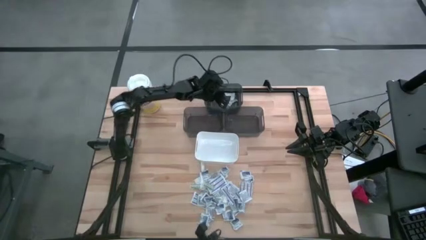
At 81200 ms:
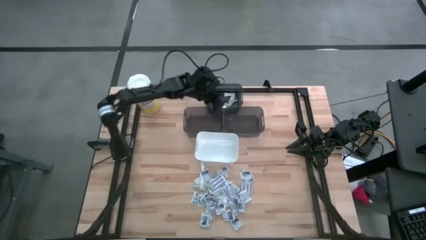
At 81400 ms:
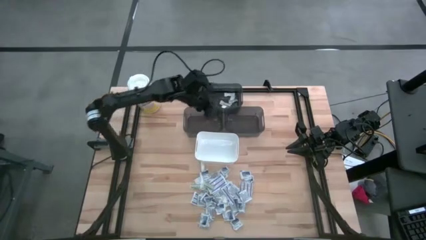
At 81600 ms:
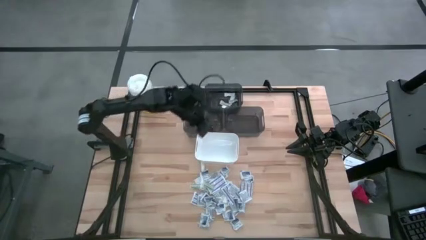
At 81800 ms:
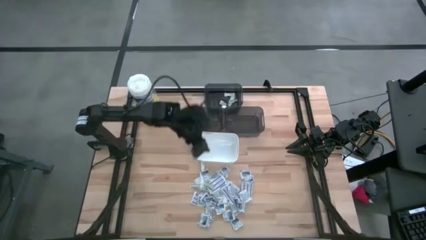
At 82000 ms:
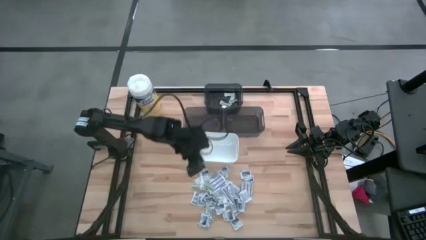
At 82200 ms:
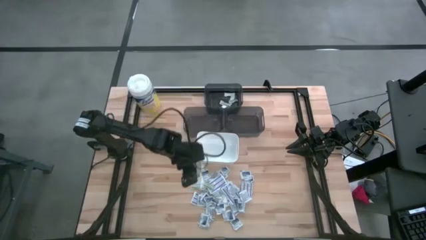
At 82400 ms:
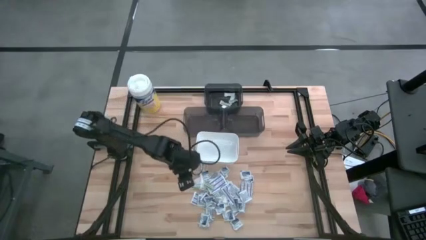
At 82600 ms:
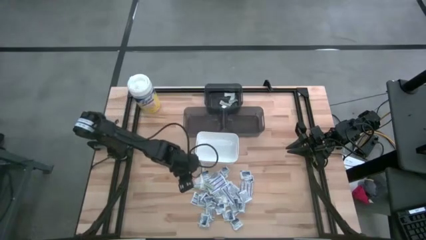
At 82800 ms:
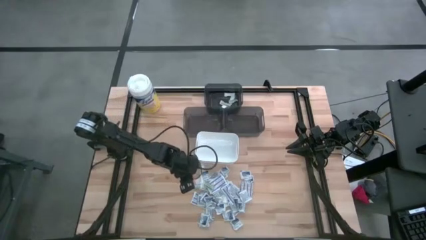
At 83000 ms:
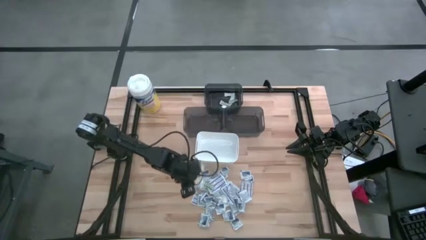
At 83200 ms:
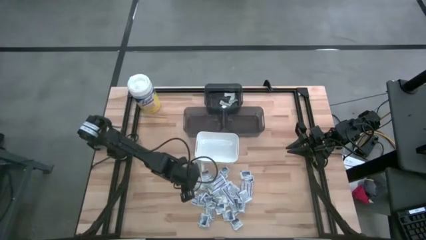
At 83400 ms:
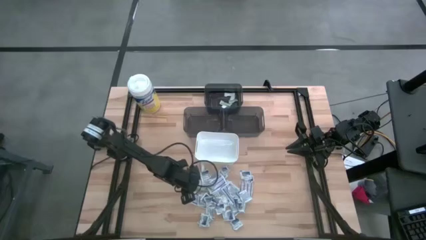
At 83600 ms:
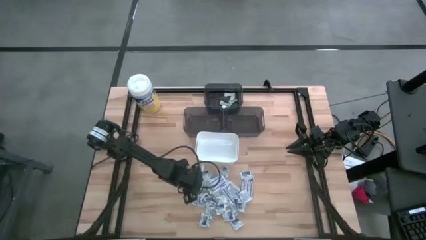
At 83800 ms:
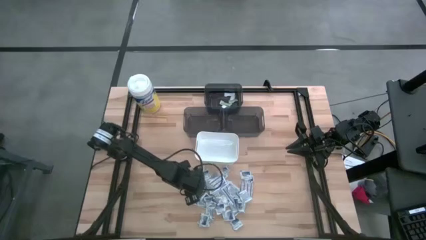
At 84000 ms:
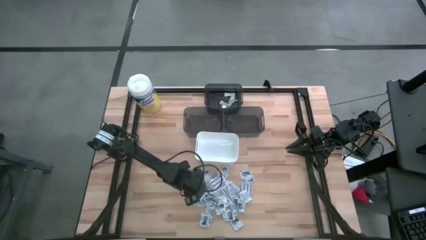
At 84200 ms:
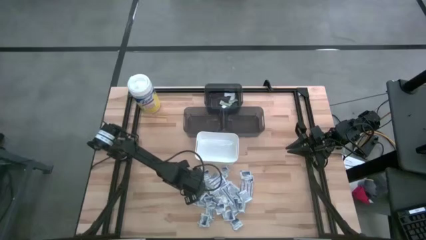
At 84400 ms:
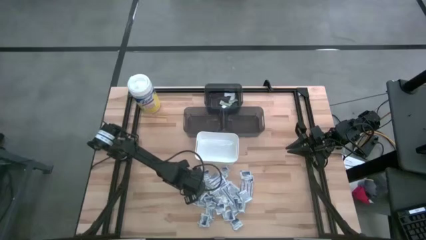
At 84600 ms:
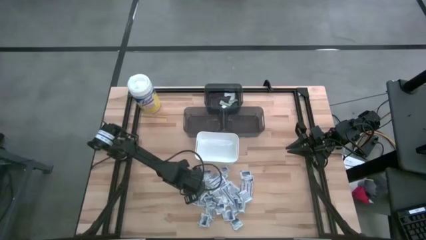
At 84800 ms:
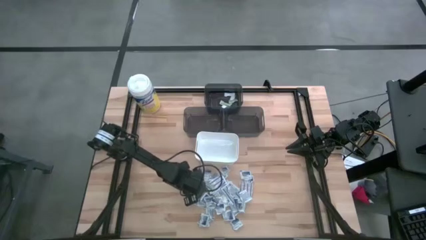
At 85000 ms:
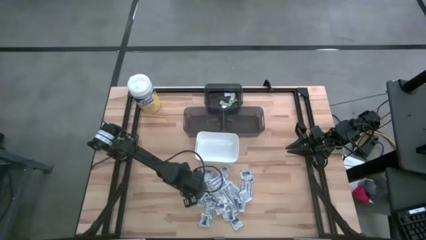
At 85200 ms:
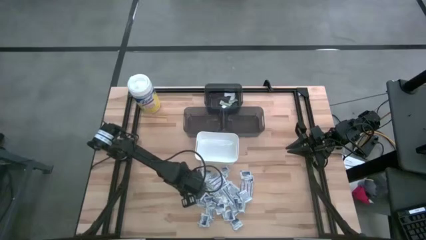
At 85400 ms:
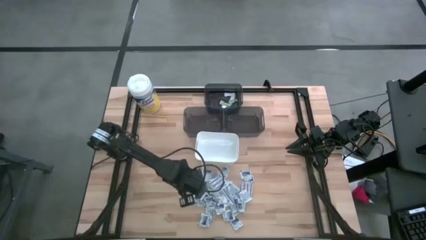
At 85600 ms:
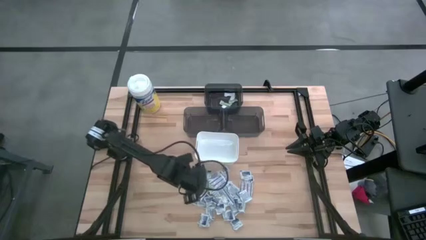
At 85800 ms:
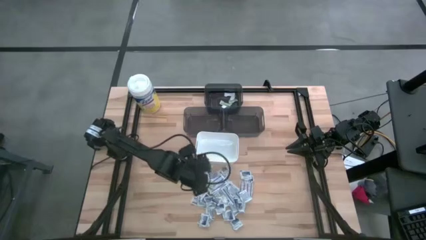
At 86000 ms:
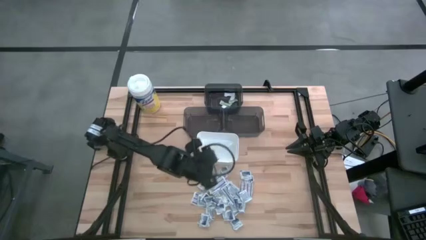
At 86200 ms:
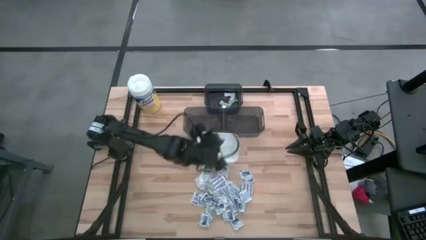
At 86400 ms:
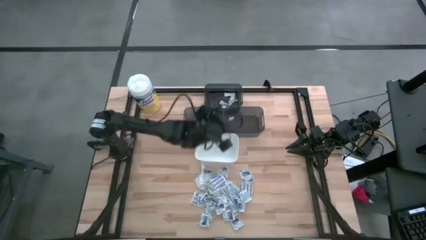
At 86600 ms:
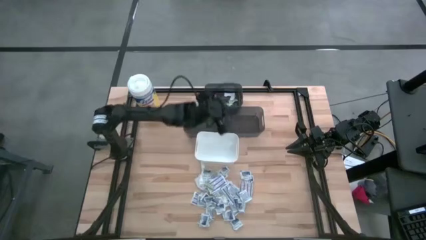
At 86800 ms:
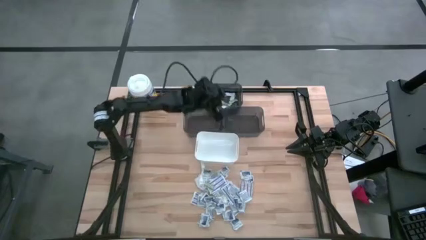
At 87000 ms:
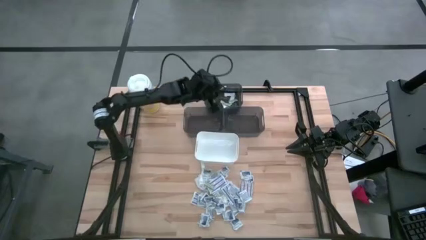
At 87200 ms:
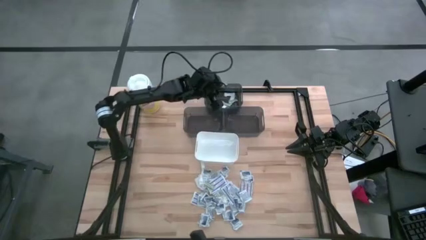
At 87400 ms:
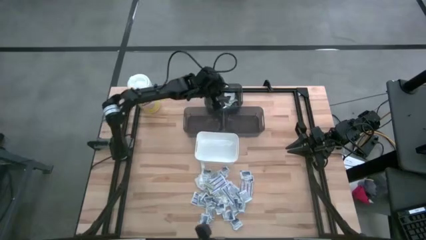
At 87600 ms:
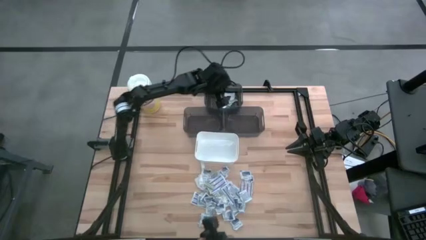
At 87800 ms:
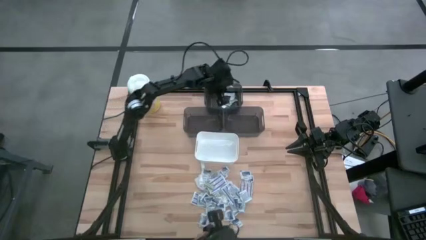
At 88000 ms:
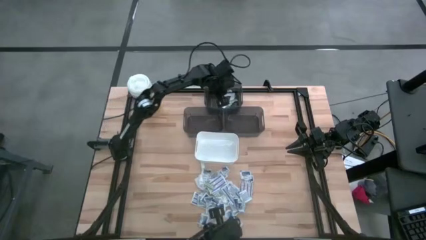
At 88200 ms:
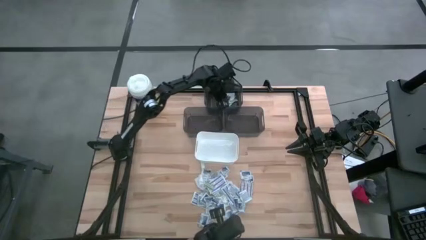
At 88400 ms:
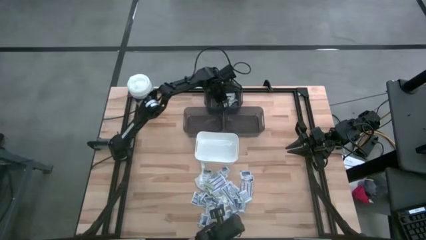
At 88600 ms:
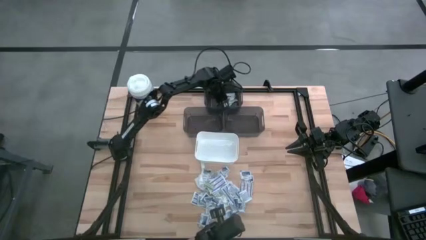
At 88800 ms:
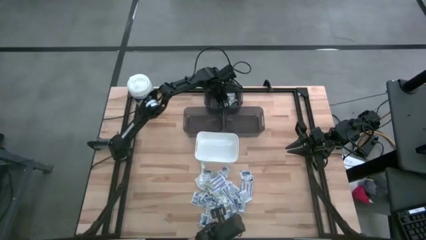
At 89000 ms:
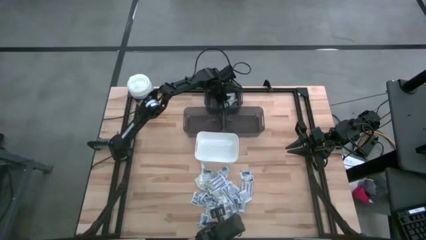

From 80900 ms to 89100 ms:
Task: Pick & Place First Aid Supplies
Put the green bandage into the top black bin

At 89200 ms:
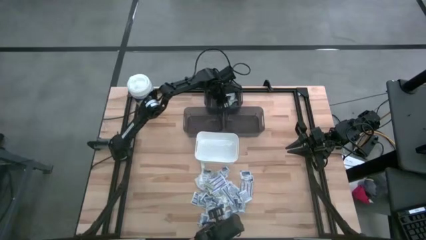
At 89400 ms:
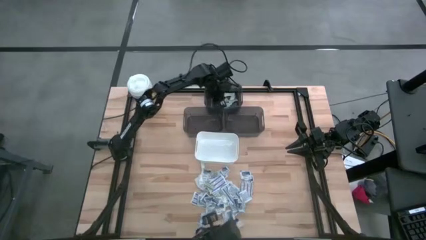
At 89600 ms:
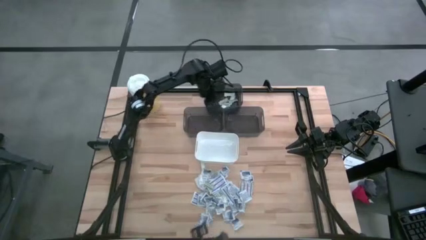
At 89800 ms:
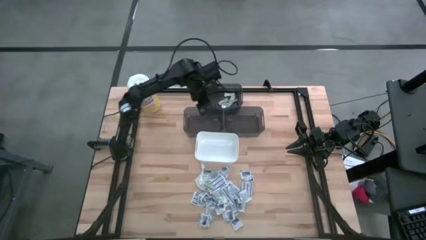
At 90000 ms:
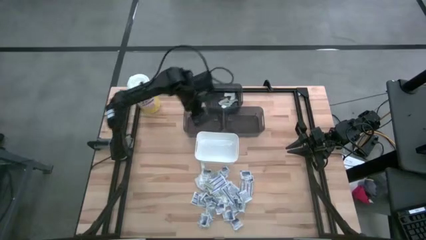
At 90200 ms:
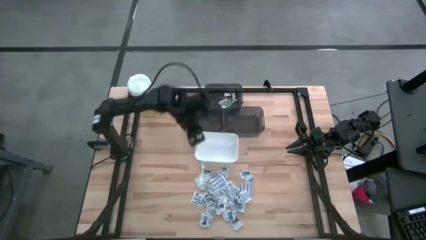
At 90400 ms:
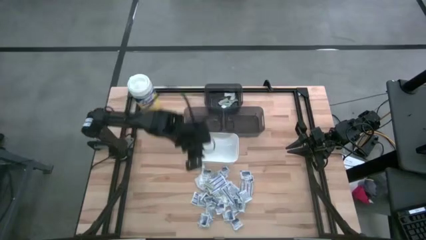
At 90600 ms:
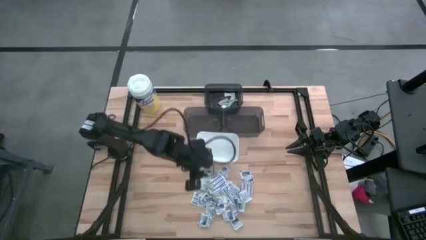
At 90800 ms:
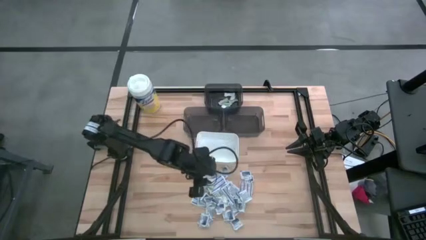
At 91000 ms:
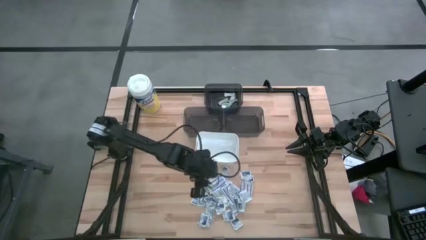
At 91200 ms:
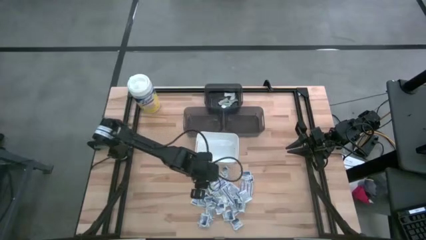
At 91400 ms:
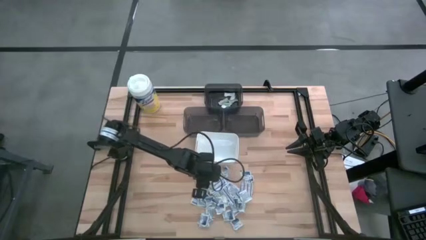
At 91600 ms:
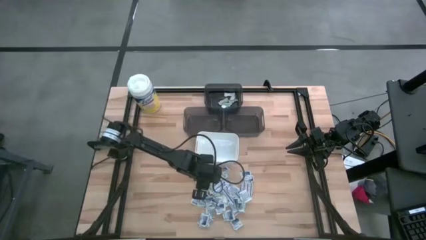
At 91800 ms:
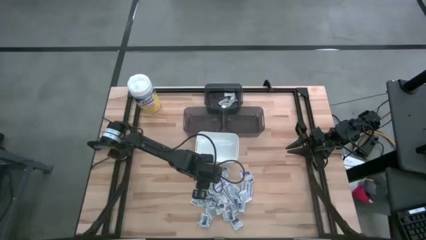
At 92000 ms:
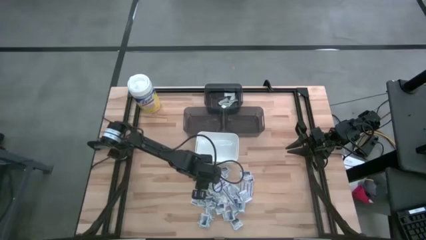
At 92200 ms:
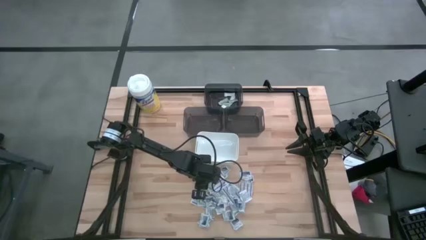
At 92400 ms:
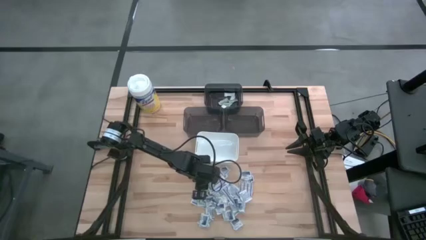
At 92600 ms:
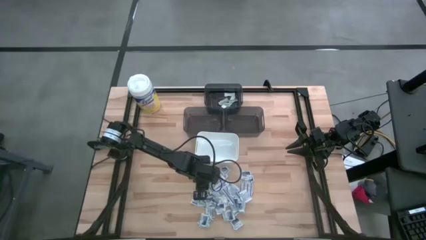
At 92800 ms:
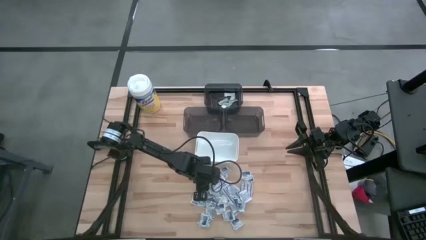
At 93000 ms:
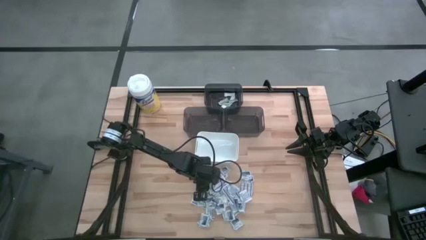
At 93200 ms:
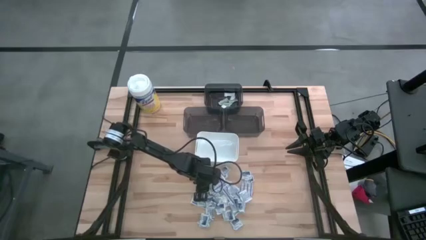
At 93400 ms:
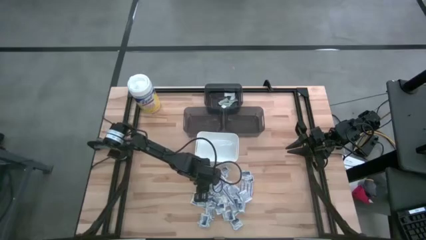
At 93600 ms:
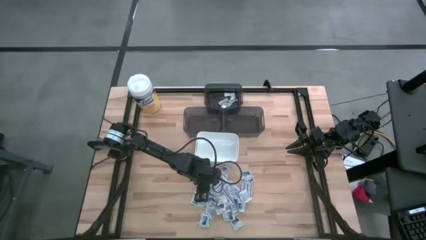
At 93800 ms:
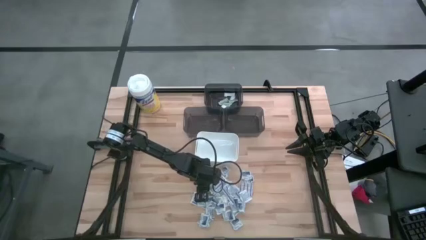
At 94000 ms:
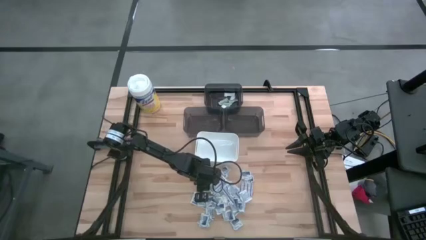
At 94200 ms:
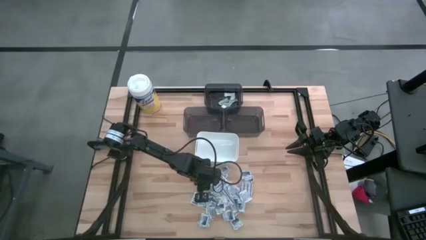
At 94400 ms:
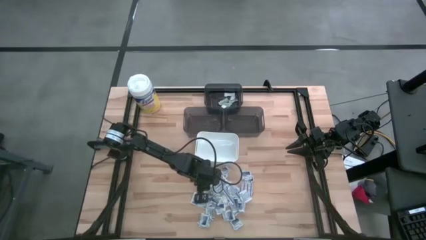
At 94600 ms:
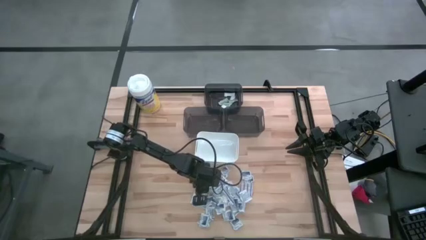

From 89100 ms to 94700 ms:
Put the green bandage into the top black bin

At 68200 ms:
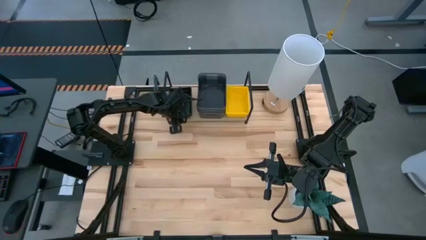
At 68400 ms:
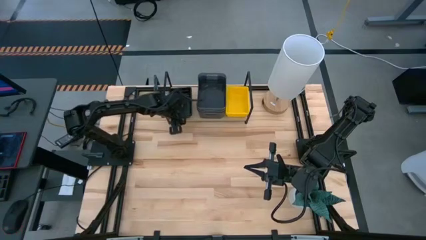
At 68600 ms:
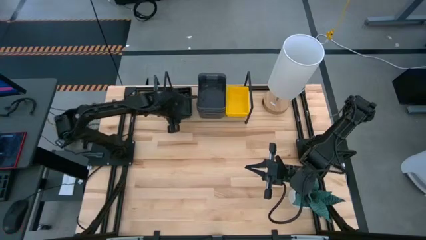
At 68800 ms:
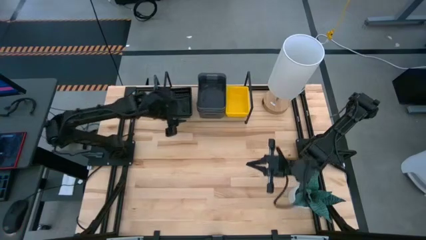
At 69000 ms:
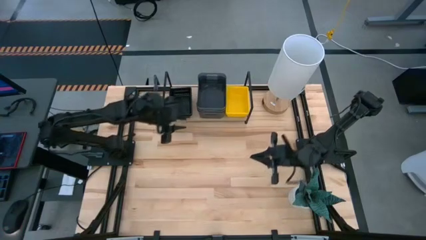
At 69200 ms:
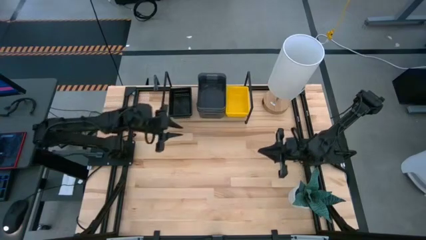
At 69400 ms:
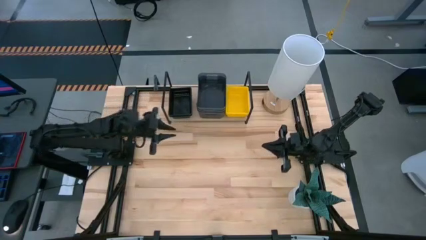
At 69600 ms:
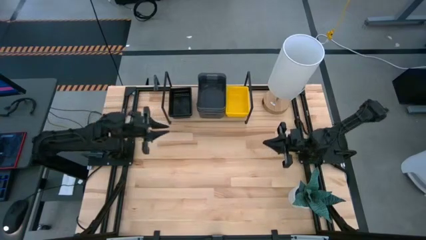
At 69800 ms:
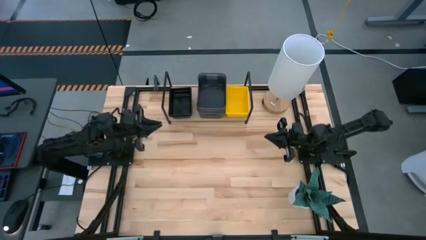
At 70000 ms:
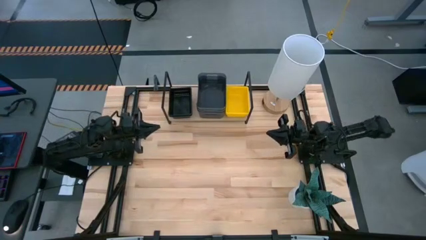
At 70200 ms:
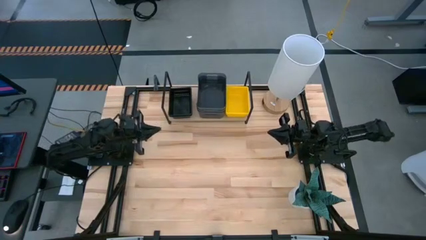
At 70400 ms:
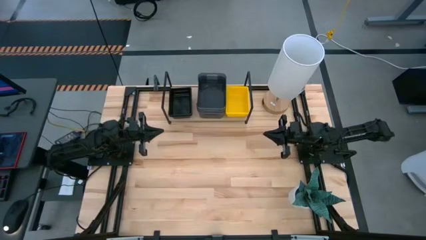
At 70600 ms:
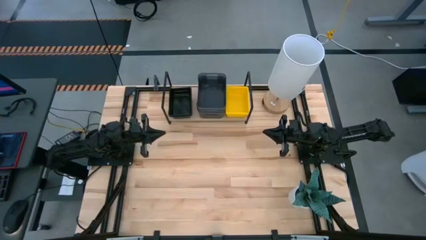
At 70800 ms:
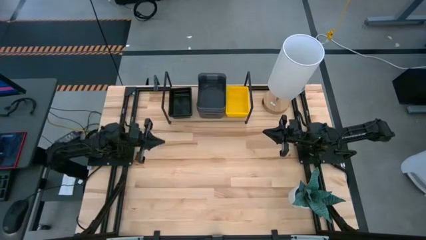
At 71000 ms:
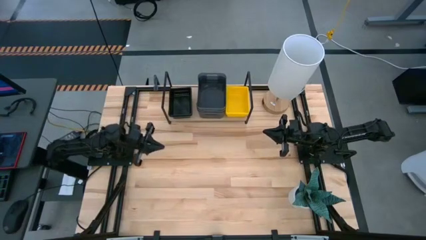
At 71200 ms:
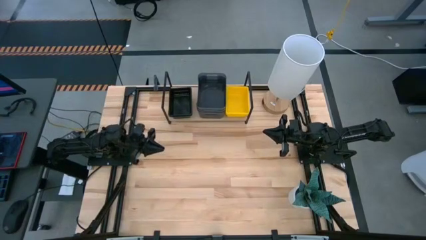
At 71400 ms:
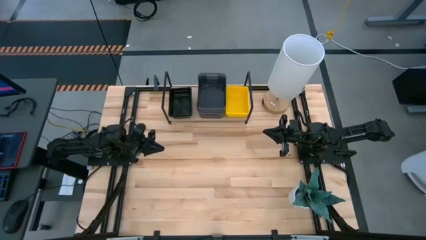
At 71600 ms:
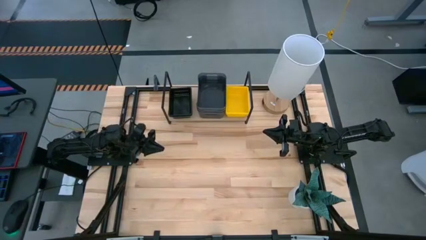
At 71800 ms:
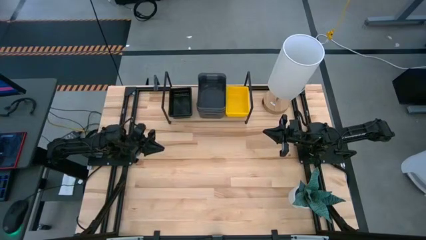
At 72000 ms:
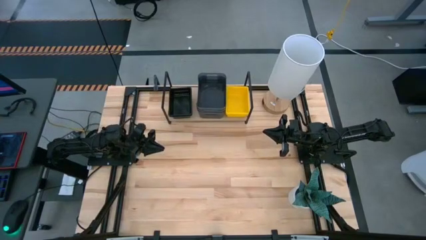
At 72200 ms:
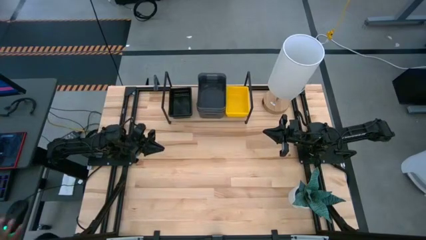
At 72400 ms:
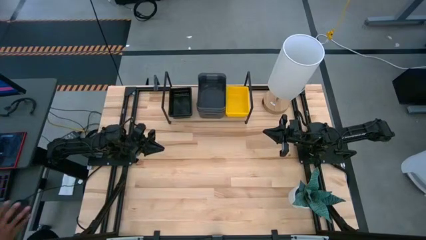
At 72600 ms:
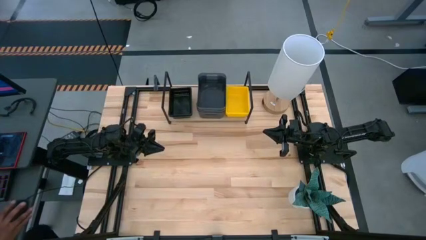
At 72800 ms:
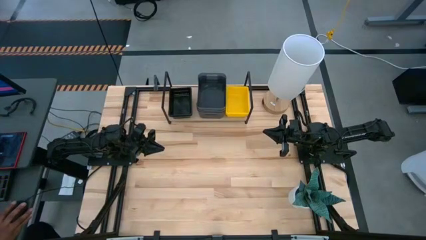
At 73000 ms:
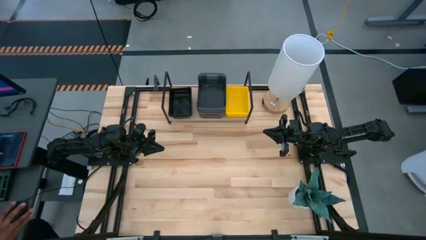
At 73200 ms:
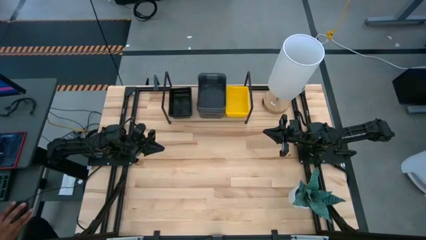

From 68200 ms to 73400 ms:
Task: Stack baskets on shelf by color
Return to Home Position
